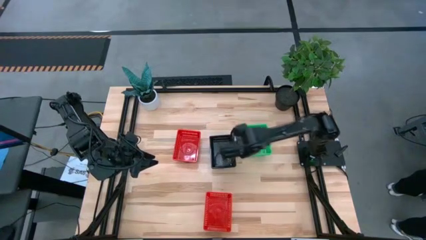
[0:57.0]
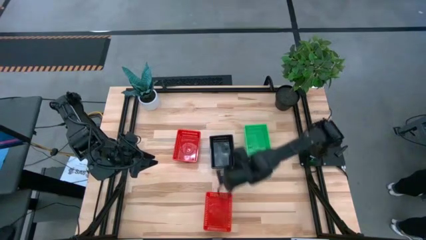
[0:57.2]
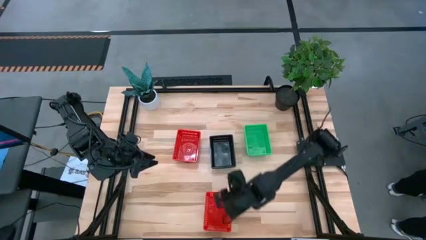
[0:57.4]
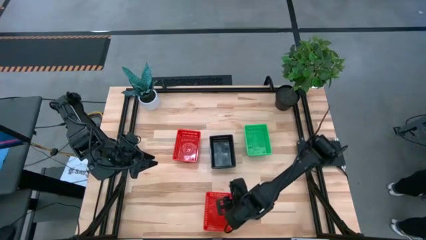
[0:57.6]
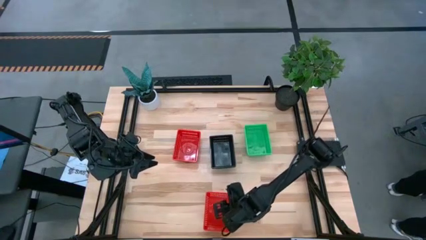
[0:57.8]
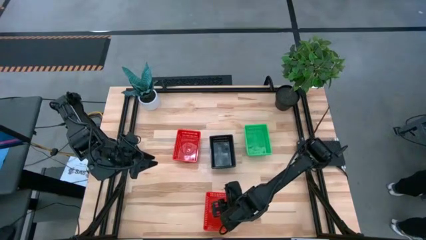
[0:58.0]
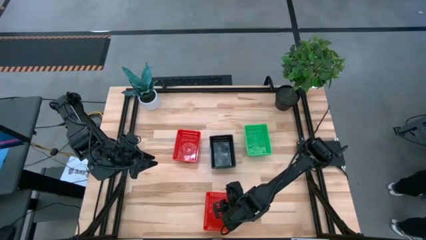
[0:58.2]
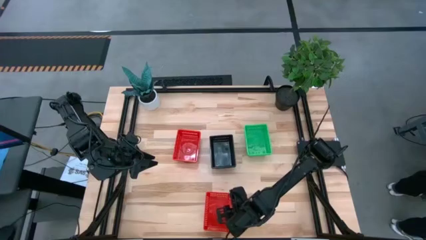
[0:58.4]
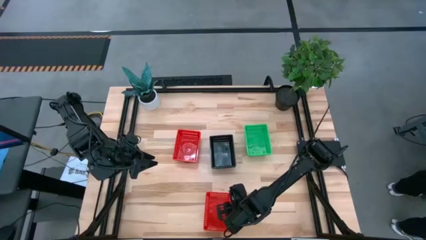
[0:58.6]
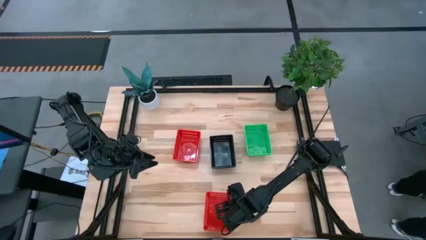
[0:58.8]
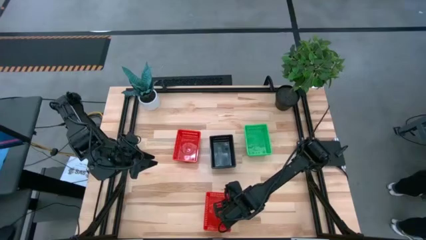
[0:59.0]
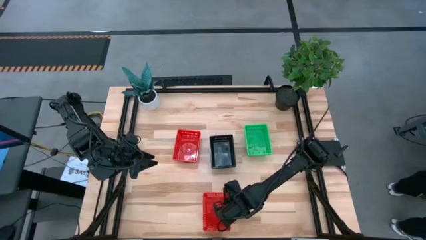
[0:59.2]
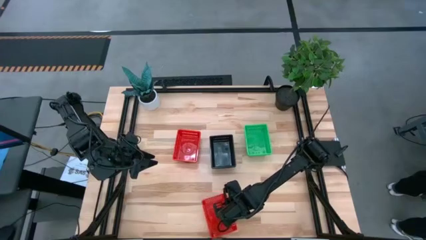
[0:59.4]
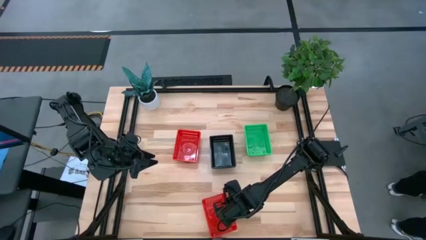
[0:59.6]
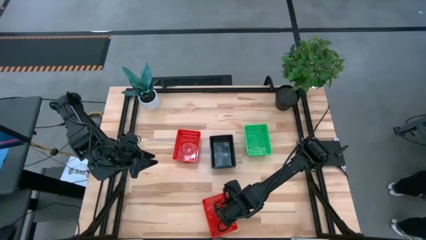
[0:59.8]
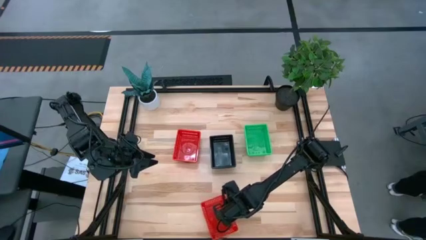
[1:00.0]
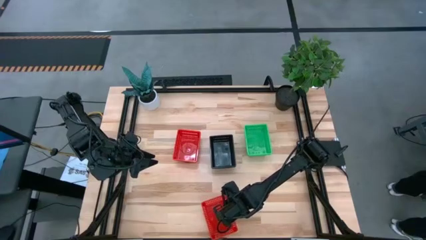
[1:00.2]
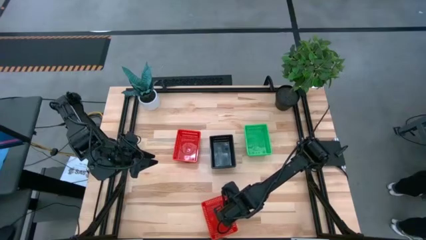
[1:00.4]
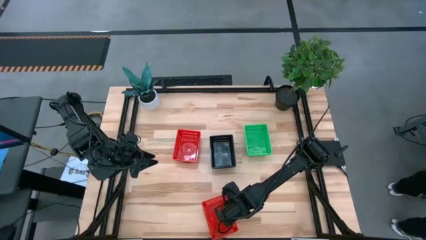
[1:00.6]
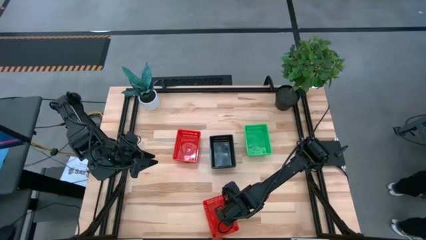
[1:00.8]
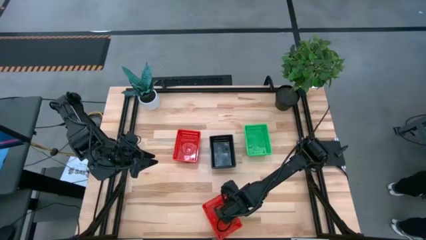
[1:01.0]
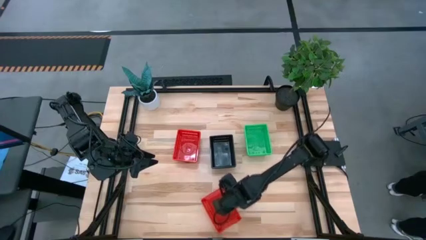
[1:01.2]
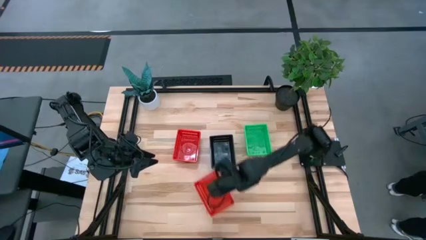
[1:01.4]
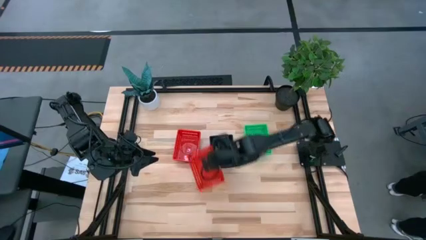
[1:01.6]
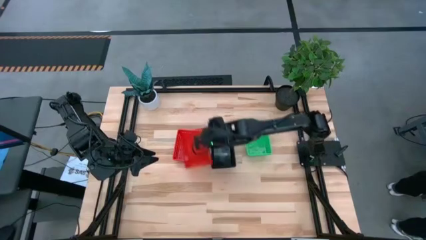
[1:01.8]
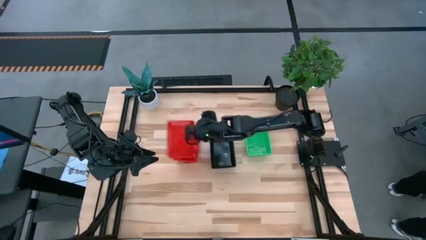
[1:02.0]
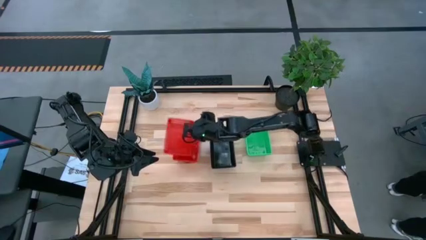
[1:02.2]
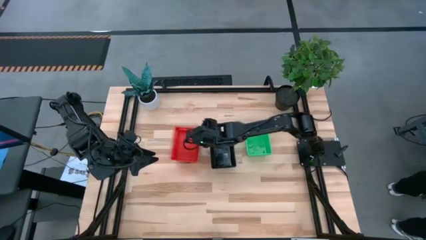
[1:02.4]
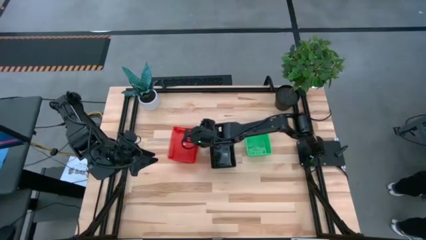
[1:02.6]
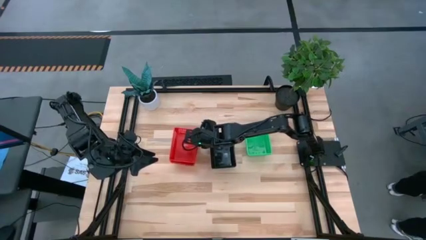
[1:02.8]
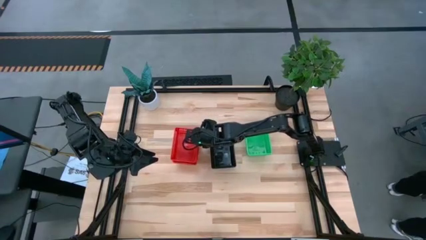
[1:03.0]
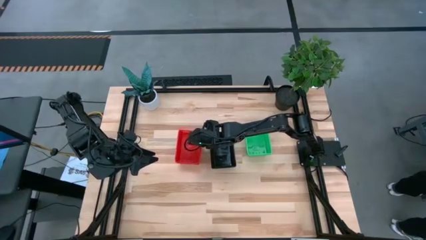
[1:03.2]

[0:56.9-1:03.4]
Stack the bottom red basket on the red baskets

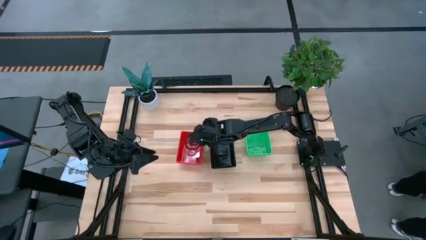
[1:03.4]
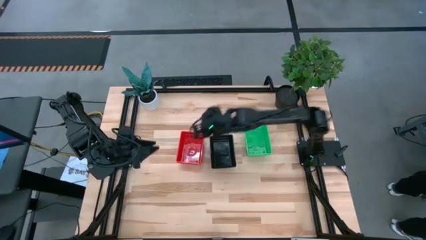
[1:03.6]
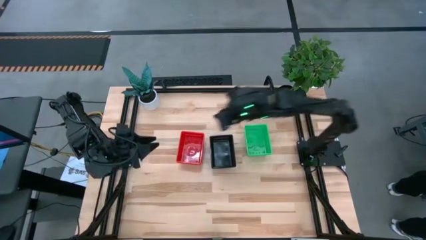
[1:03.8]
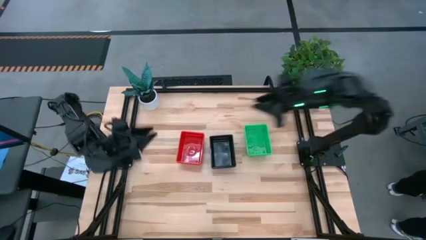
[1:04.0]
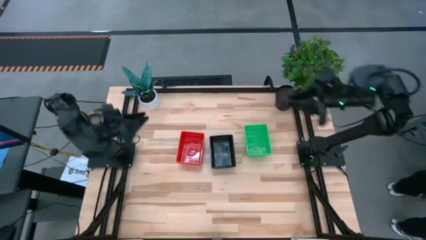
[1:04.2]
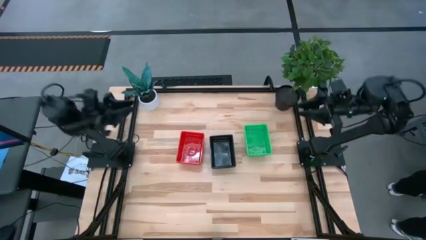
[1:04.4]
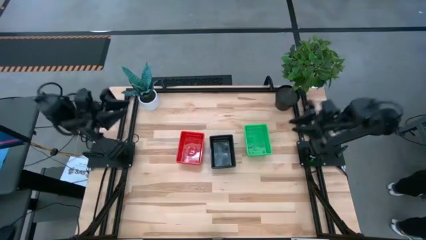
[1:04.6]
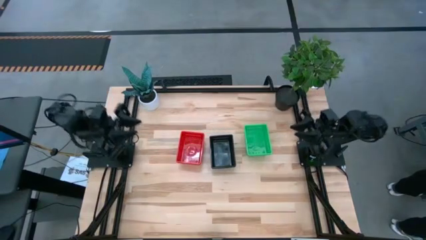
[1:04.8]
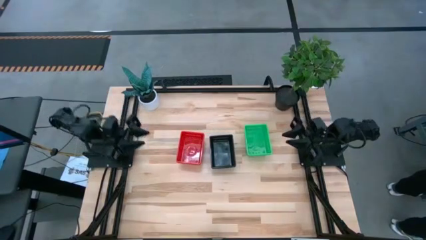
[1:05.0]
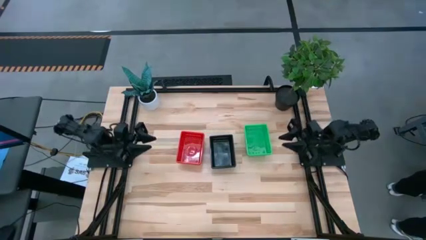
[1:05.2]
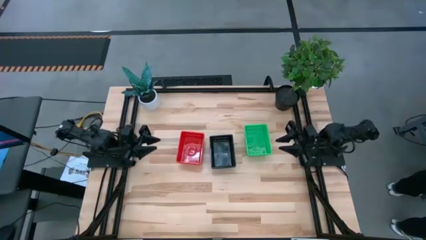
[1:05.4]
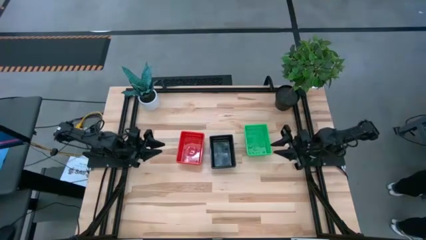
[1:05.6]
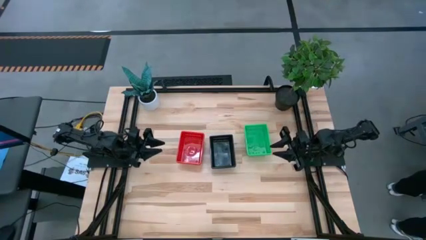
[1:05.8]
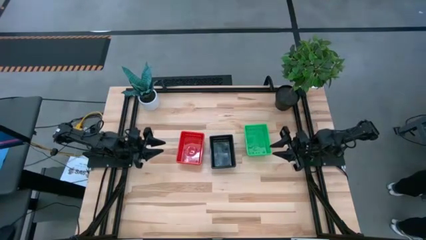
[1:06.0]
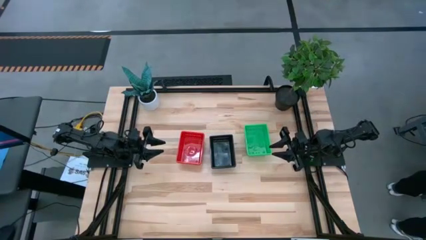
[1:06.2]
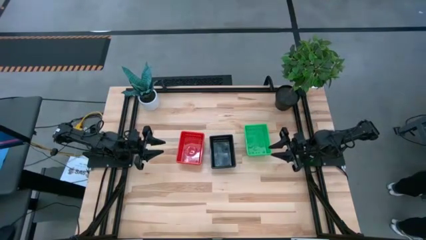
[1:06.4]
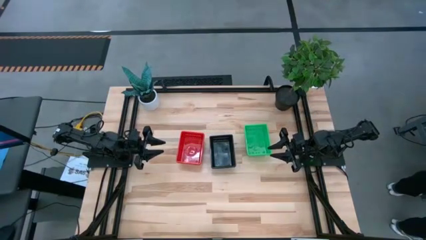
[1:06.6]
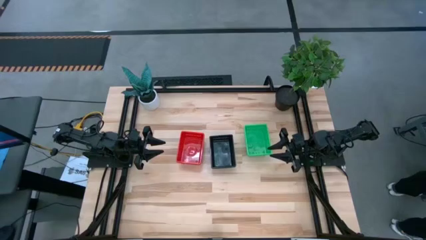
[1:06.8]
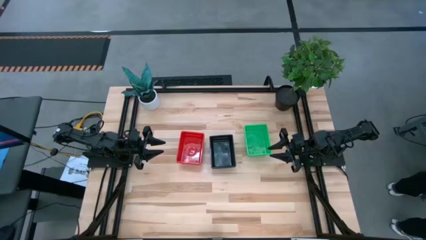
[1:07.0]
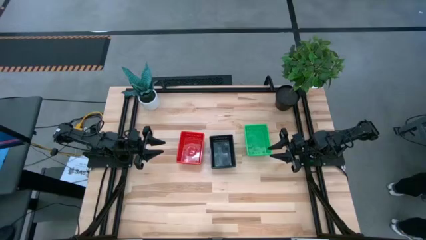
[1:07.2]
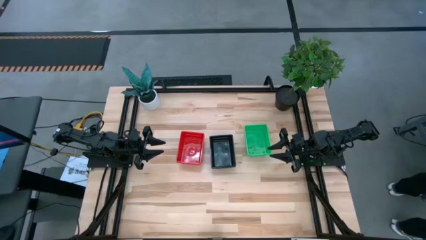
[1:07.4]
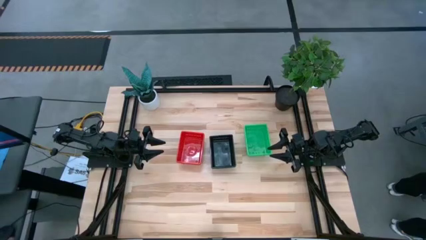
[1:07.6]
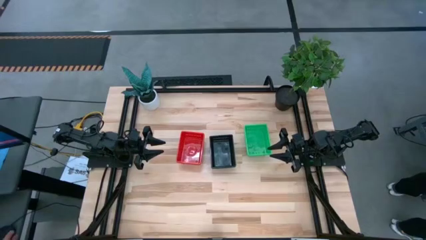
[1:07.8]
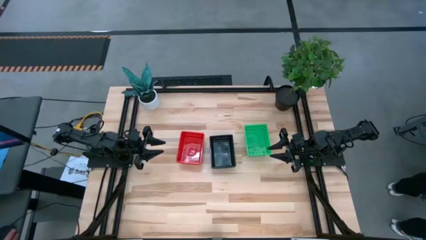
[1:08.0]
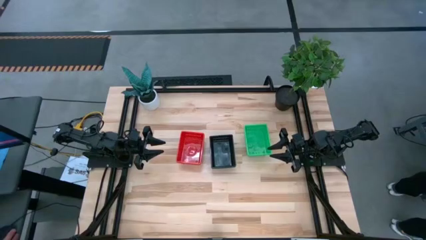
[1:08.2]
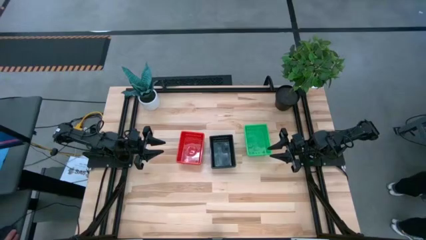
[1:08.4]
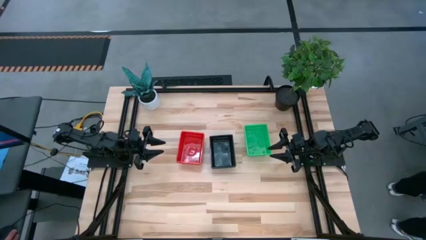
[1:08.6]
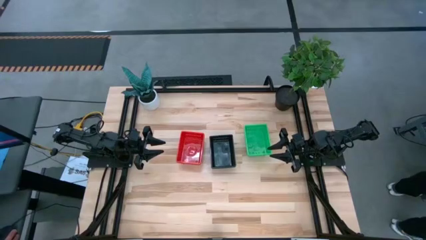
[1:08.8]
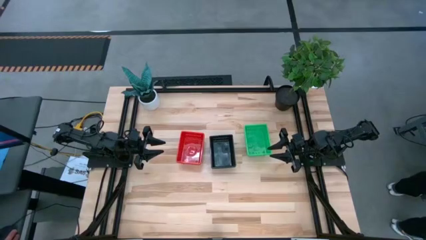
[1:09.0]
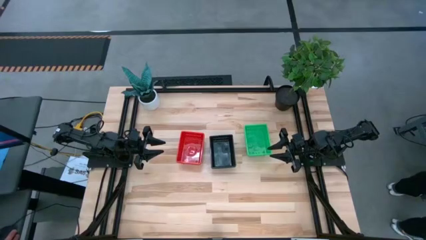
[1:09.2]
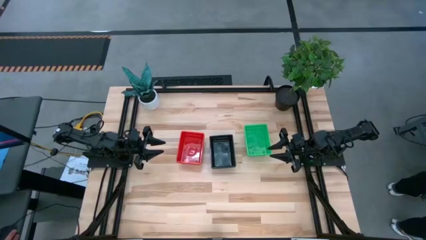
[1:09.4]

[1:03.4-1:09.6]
Return to Home Position

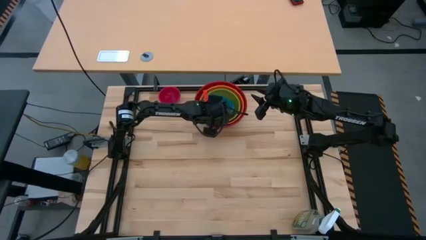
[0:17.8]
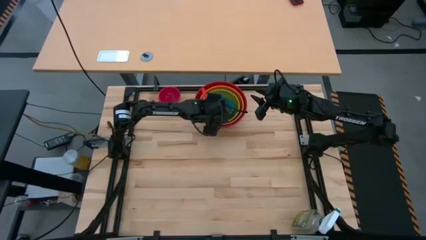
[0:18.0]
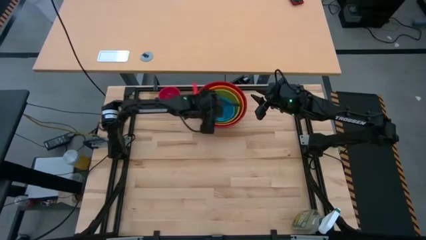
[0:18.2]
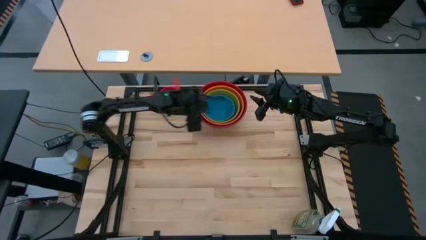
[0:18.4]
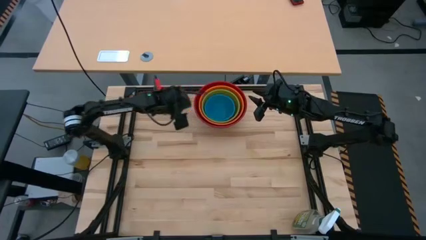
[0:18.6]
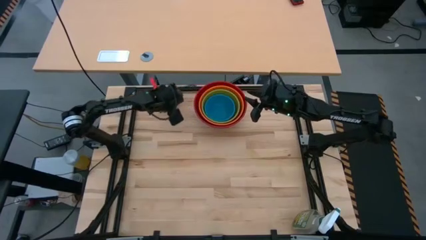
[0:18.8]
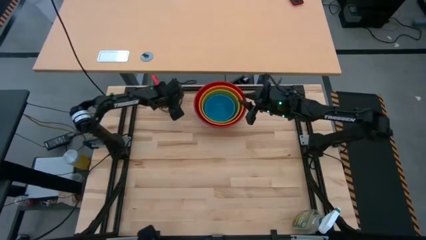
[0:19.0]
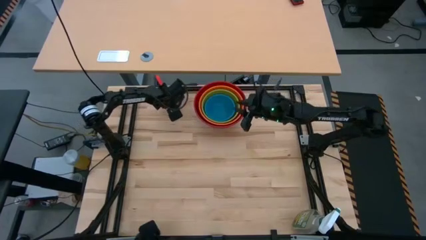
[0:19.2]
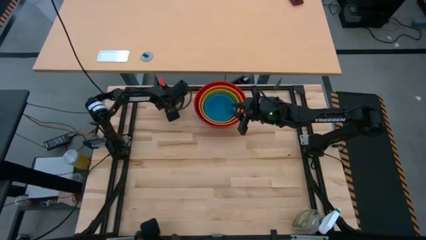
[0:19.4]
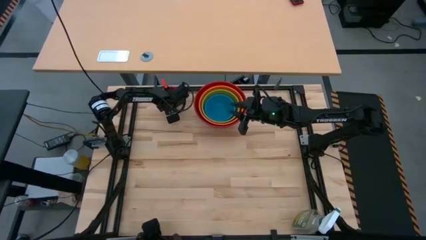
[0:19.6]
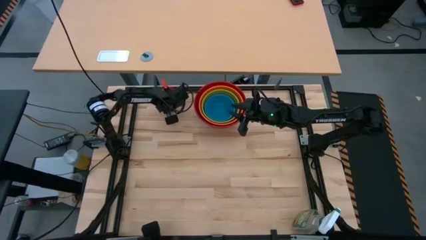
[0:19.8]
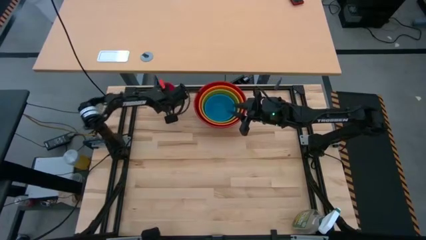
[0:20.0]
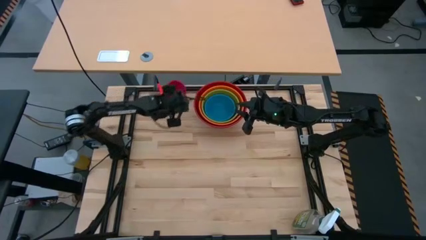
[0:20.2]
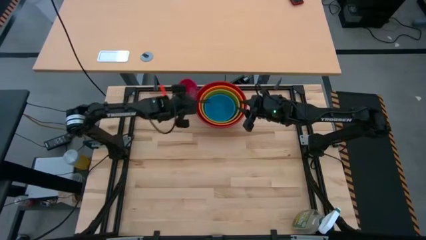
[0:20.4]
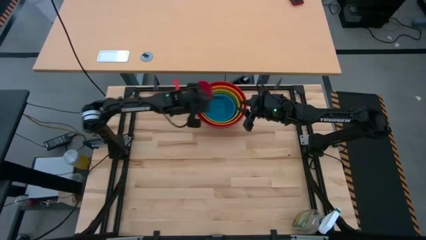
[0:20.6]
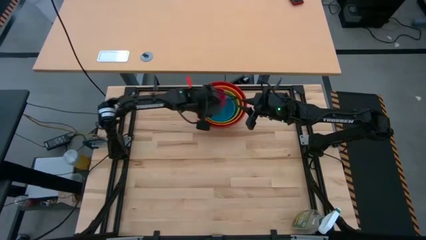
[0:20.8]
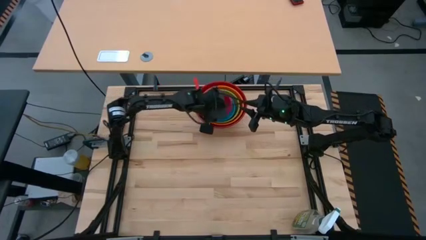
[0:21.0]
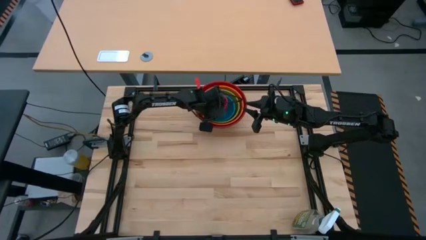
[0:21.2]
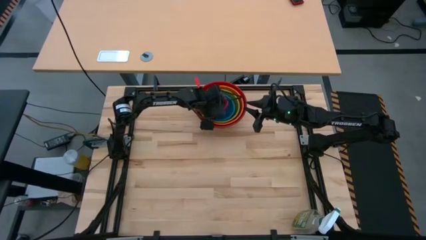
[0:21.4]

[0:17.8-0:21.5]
Stack the pink bowl on top of the blue bowl
